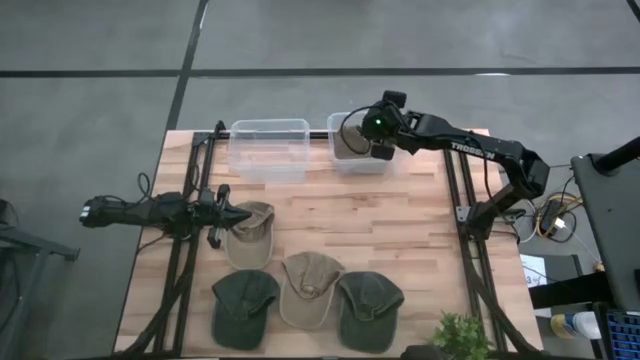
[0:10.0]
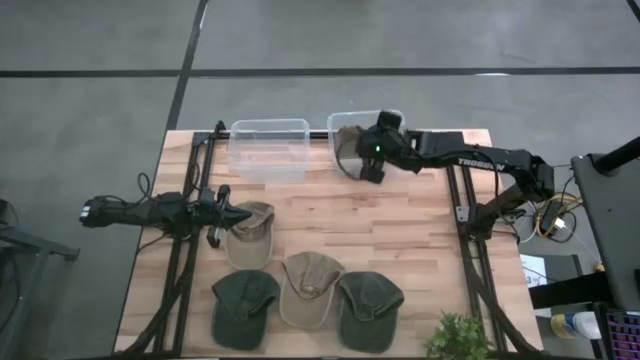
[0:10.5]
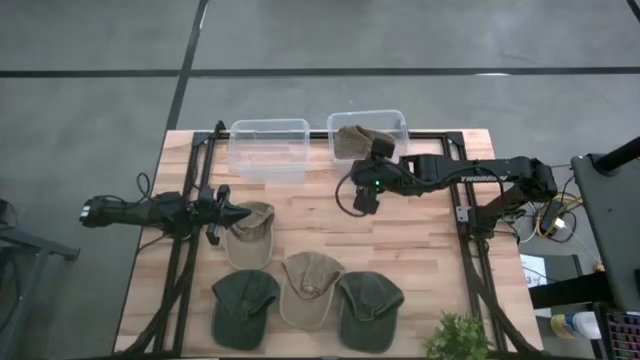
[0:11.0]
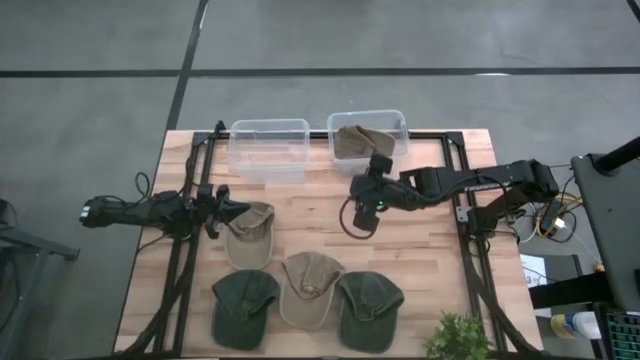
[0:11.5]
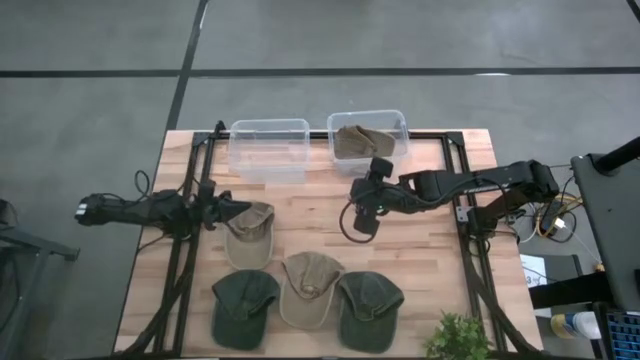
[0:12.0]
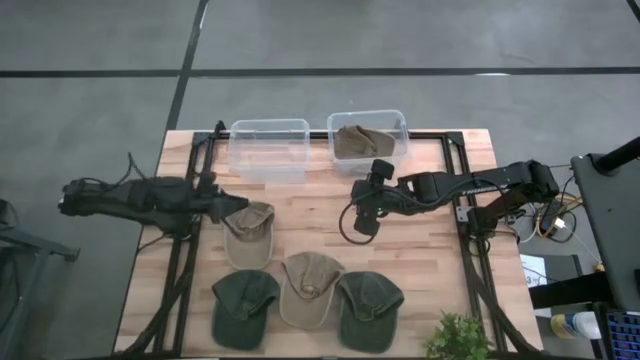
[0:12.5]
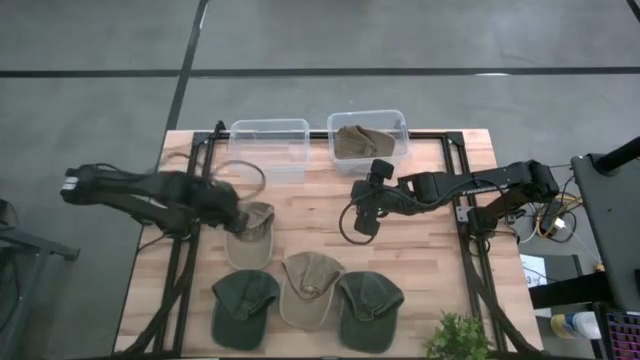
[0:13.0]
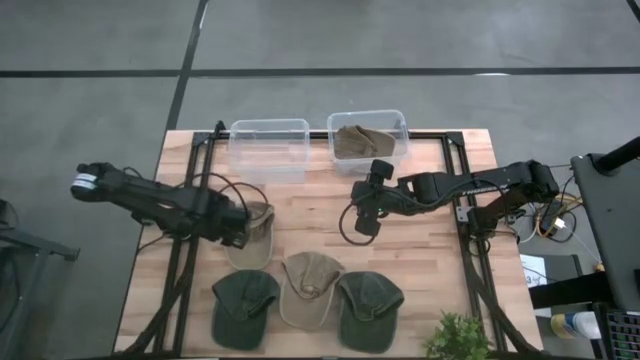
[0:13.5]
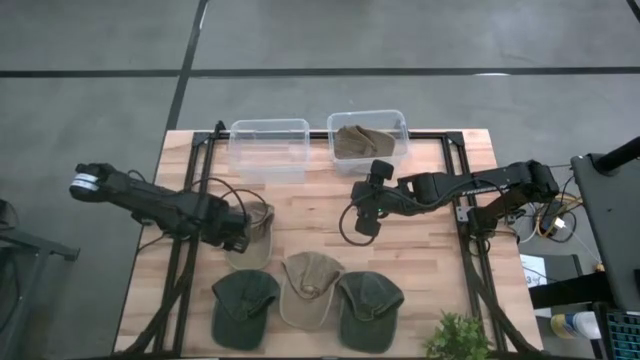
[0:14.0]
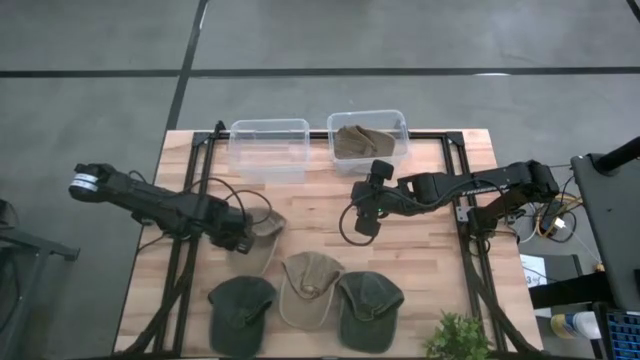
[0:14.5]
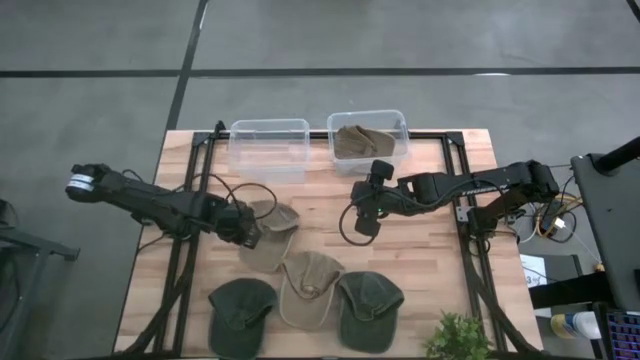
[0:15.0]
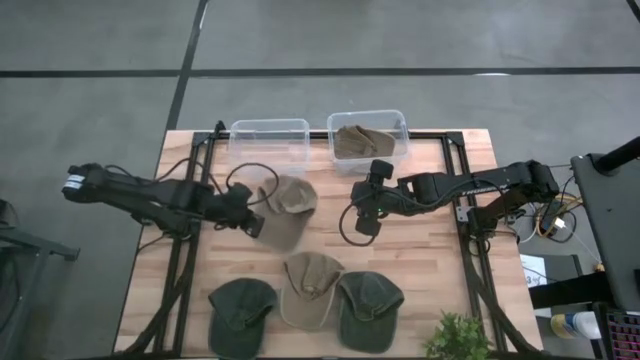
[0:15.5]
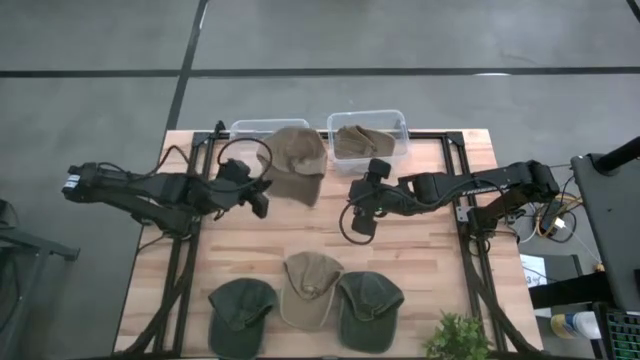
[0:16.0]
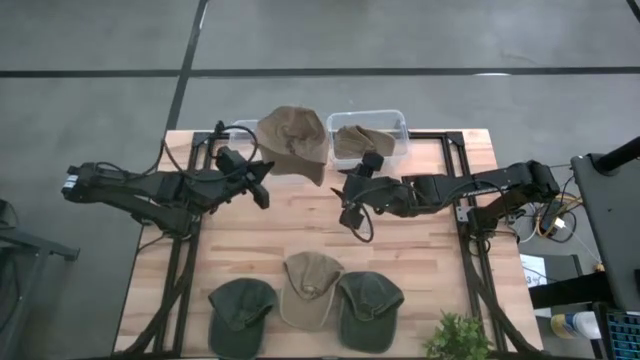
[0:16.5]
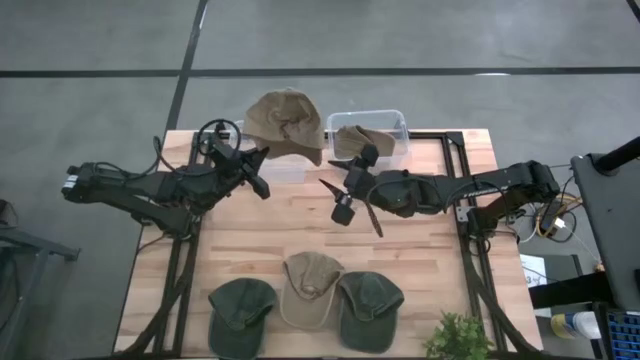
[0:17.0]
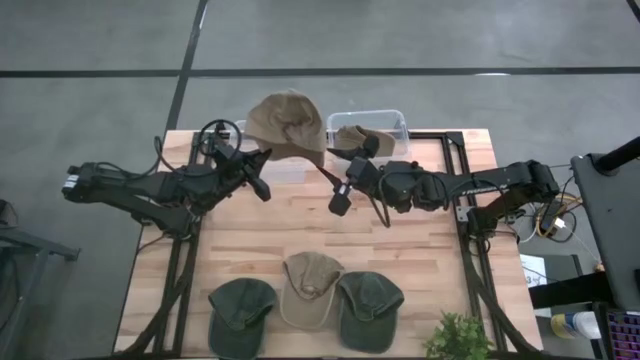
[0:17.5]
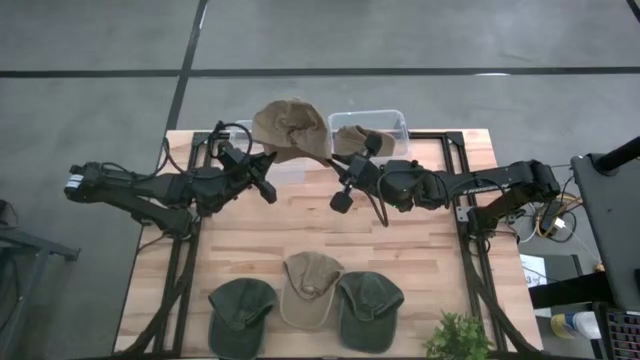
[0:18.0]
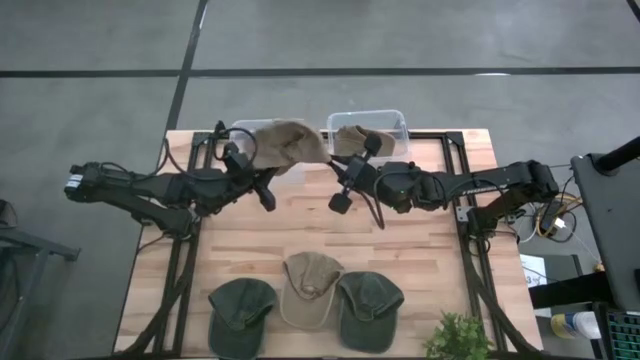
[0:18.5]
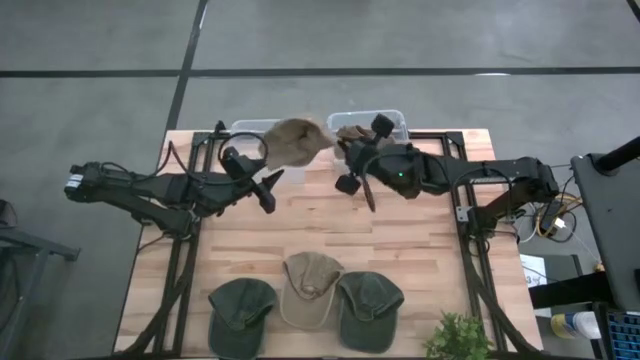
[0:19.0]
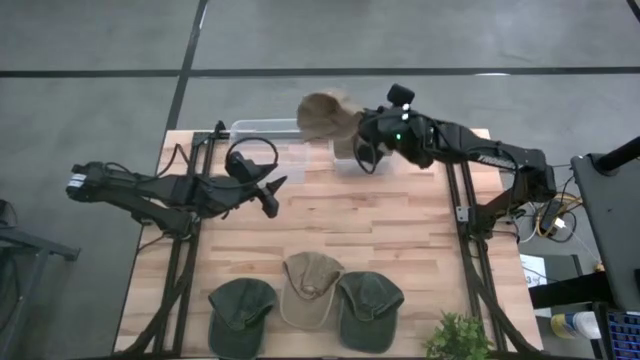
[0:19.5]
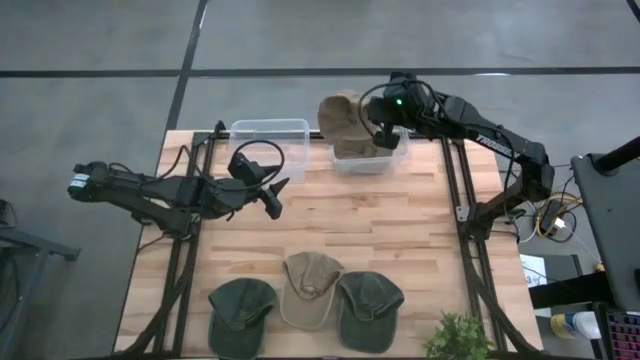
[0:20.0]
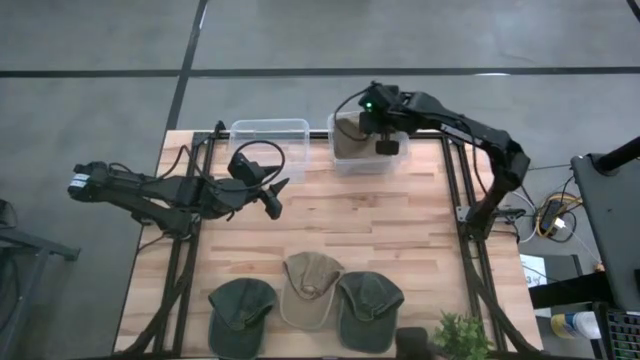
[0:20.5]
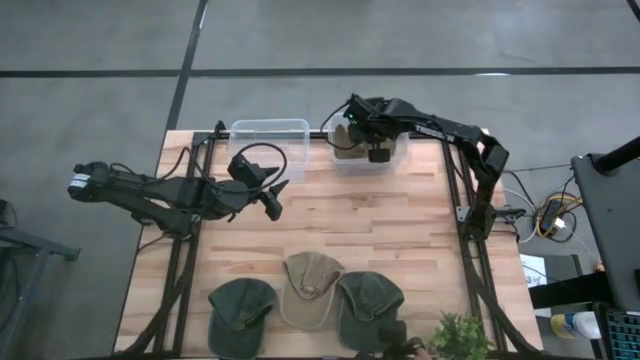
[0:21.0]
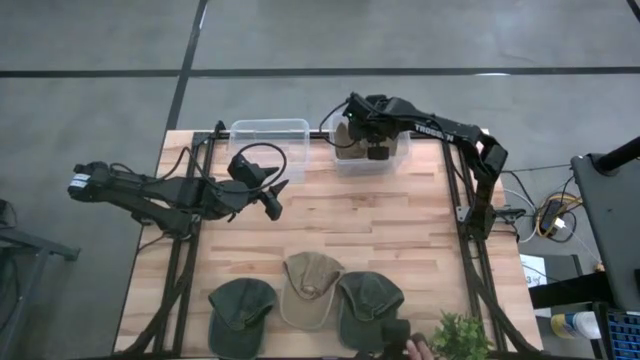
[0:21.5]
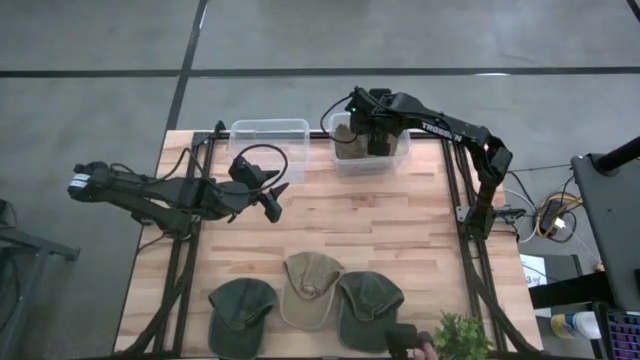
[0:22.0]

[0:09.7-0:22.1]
Task: Pick & Place hat
Put the top brown cap into the right transparent bin

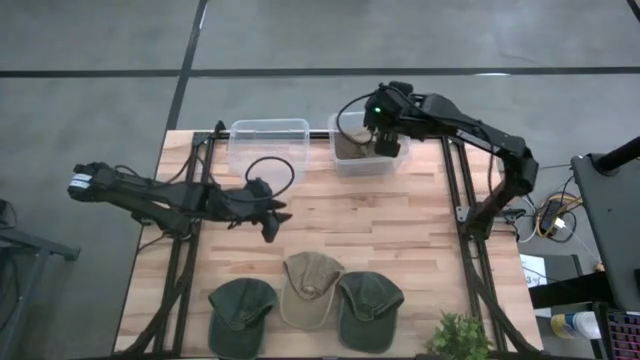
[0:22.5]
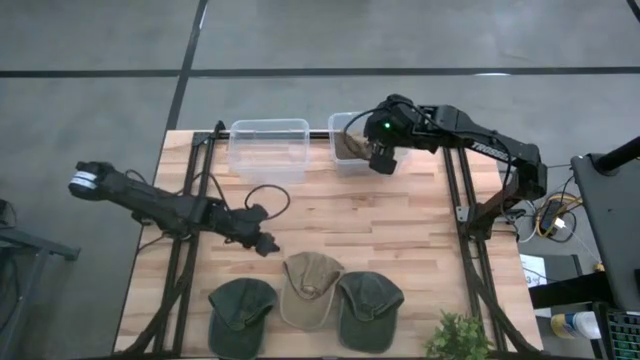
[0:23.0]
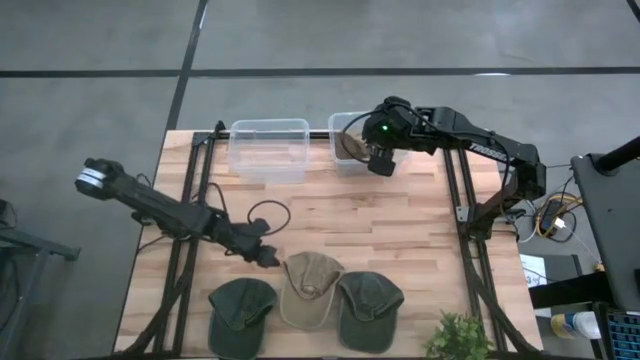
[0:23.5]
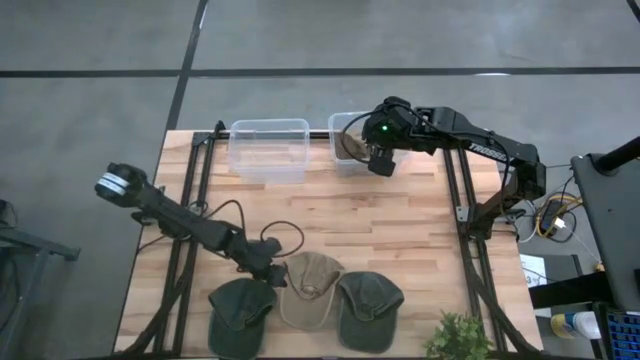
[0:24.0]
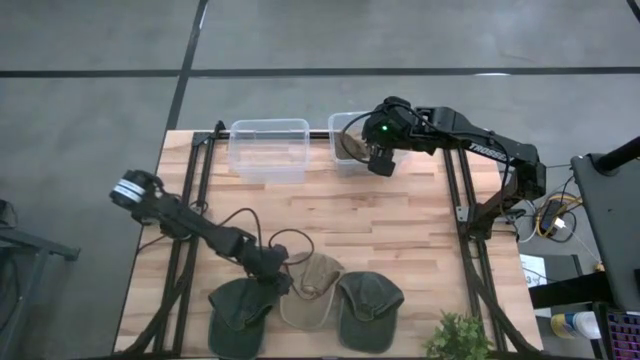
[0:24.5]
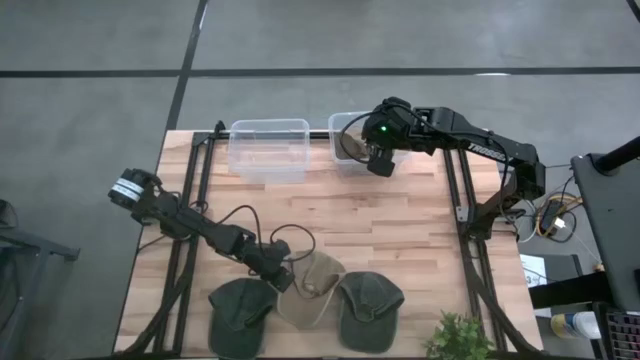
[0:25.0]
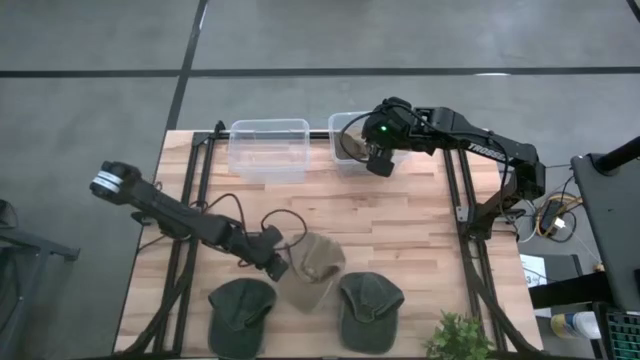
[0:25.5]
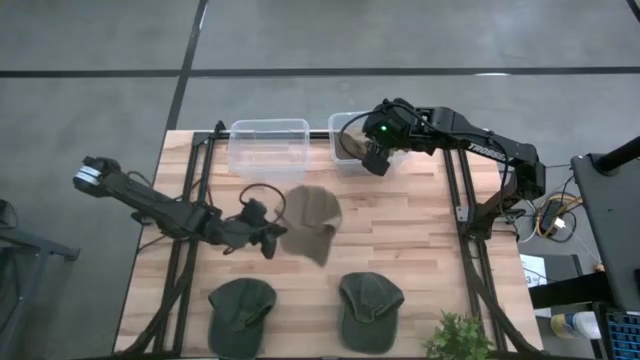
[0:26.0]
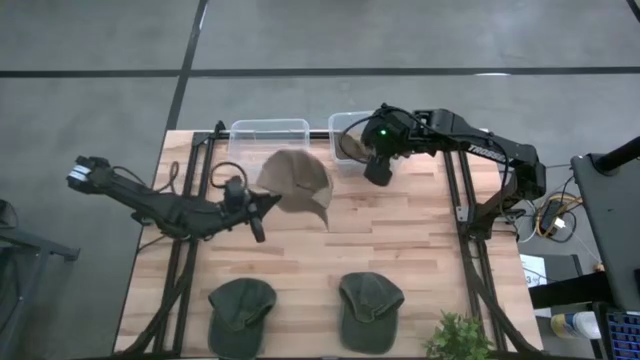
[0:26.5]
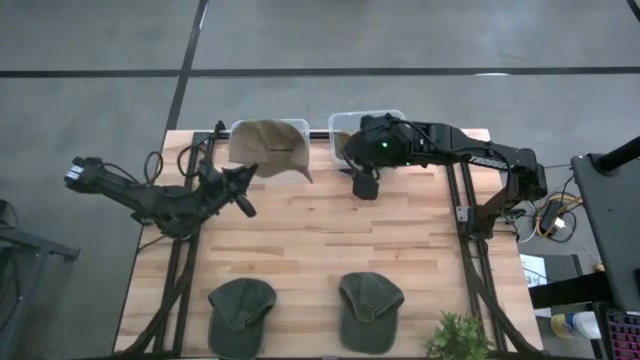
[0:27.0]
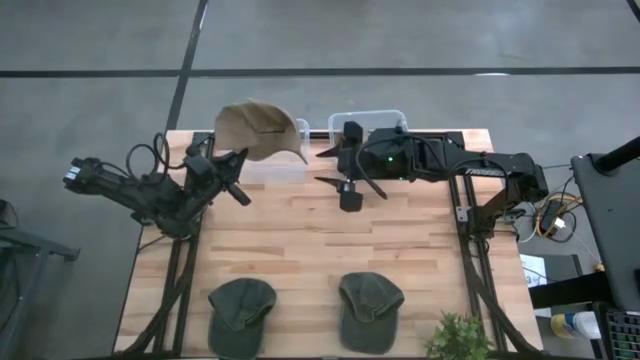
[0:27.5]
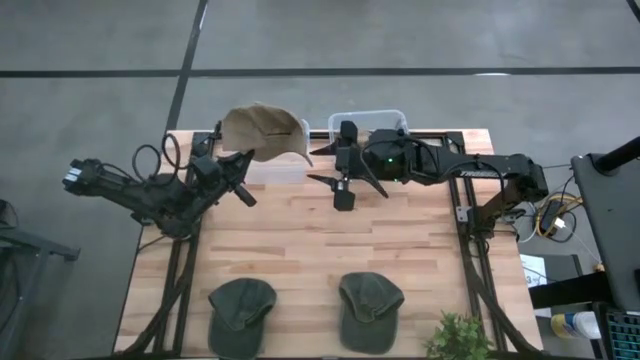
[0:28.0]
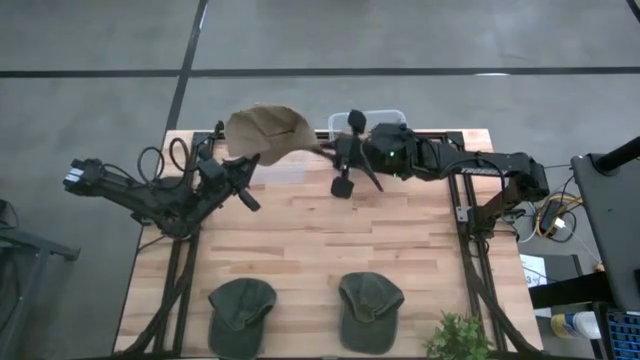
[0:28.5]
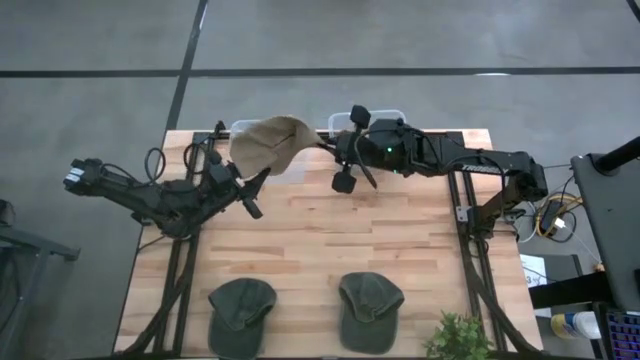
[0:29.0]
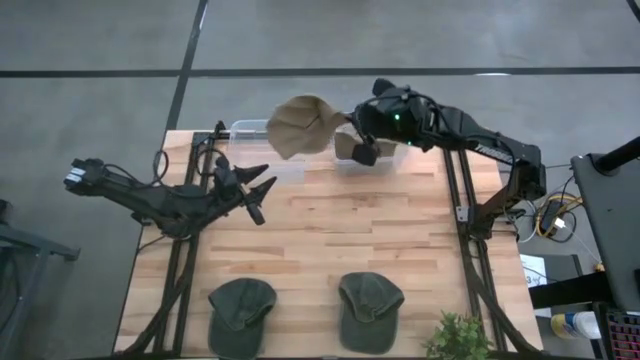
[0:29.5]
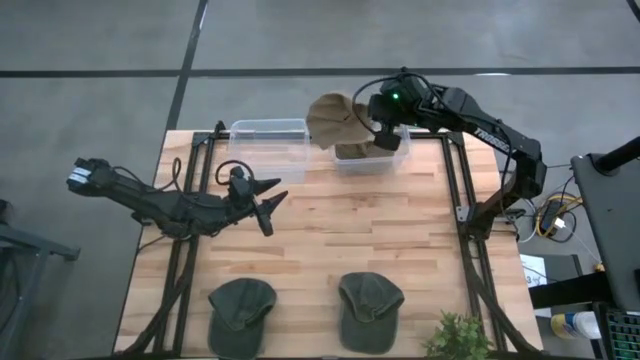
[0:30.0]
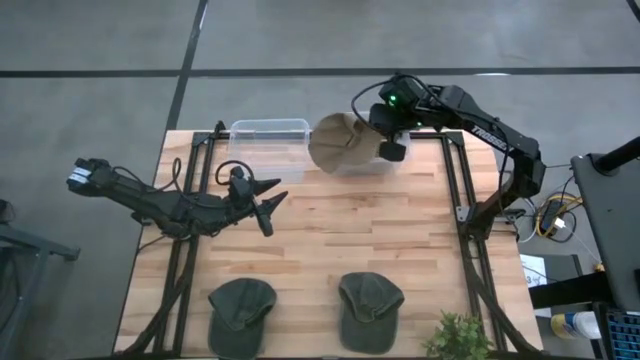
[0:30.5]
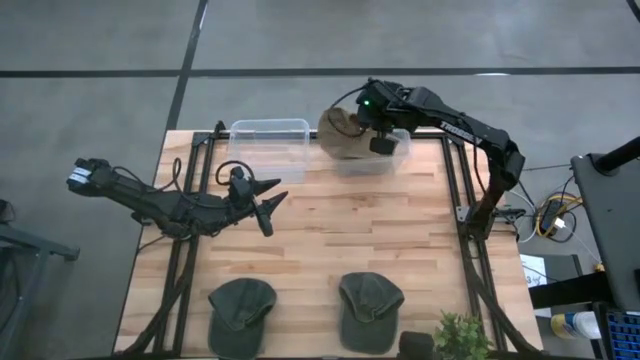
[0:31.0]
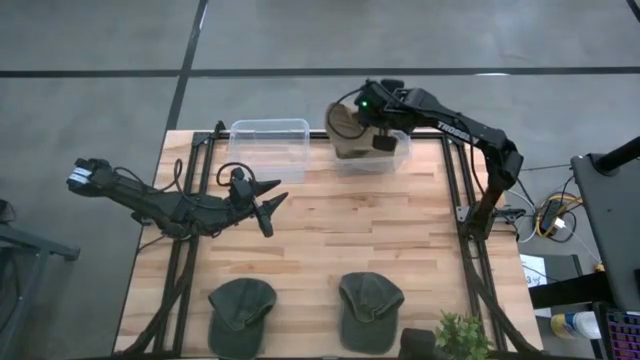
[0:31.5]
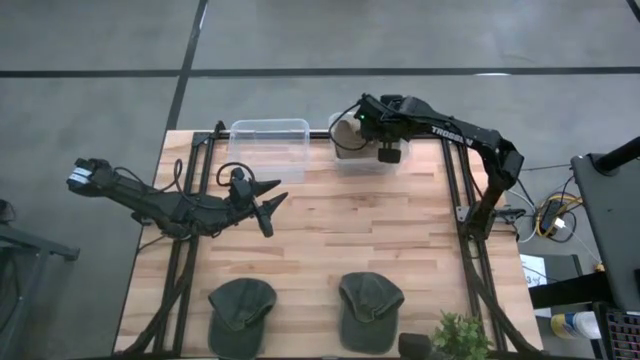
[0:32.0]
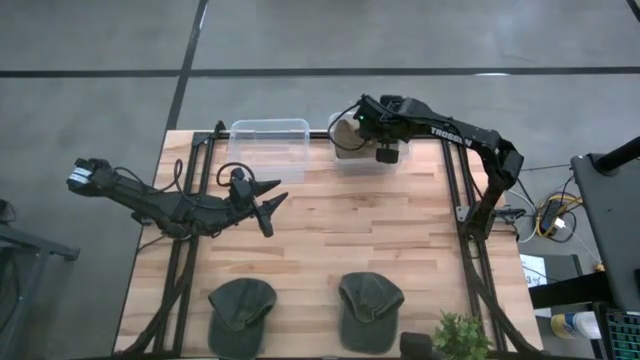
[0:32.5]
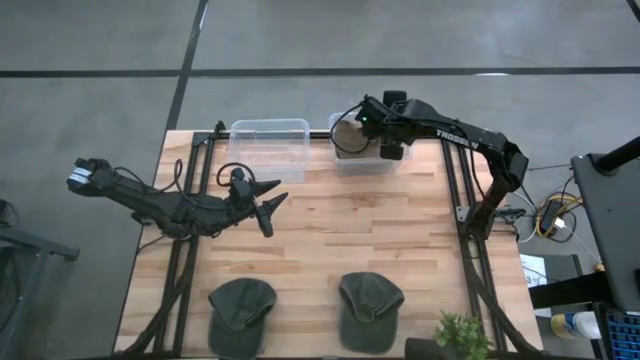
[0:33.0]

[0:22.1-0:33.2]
Put the brown cap into the right transparent bin
